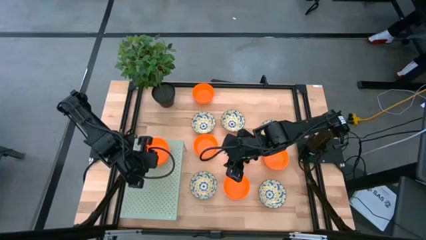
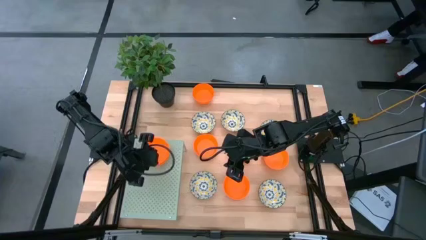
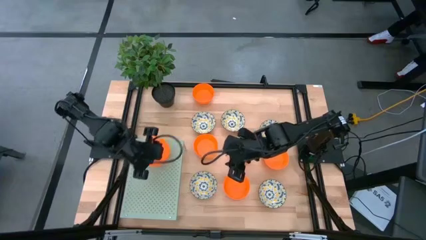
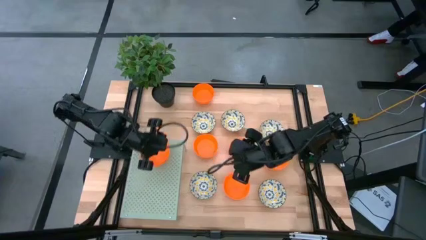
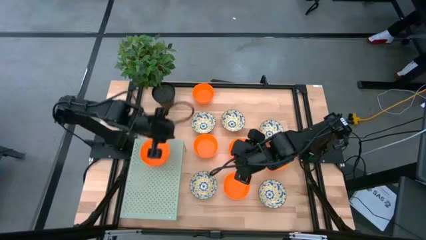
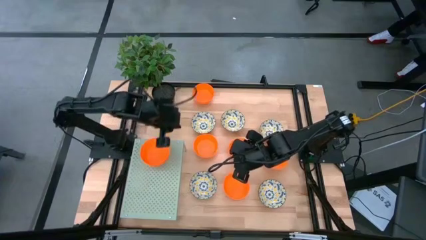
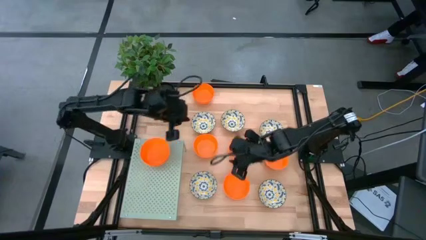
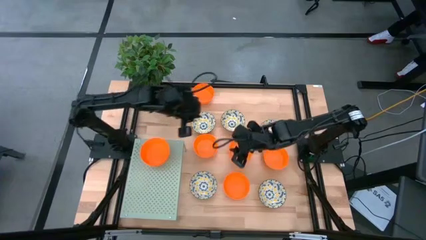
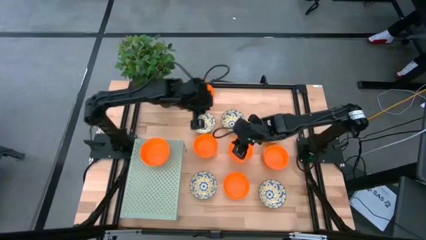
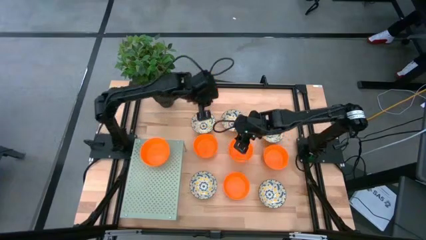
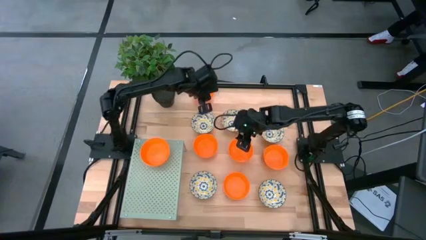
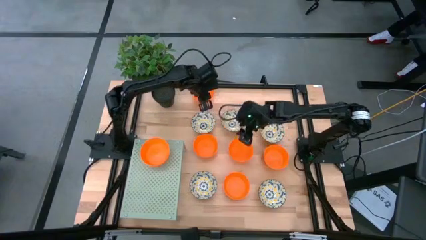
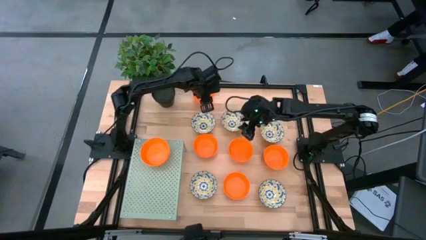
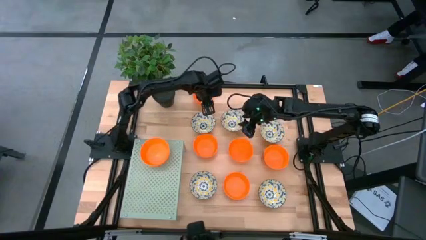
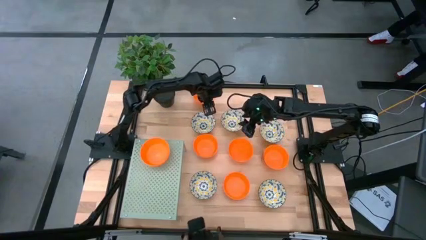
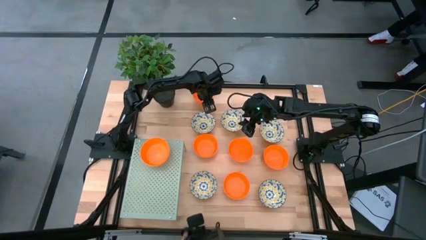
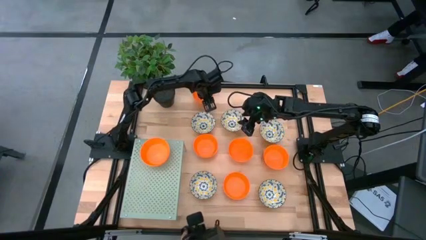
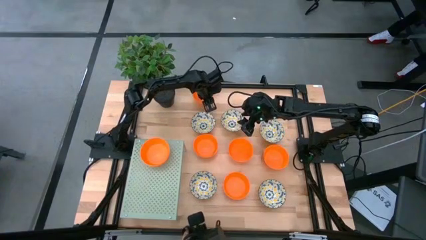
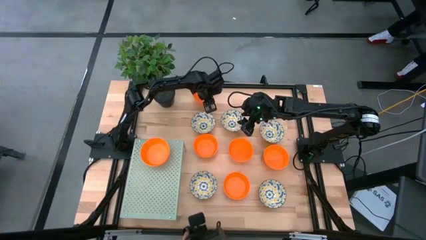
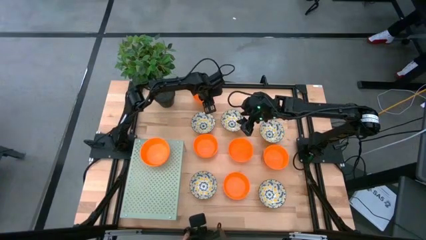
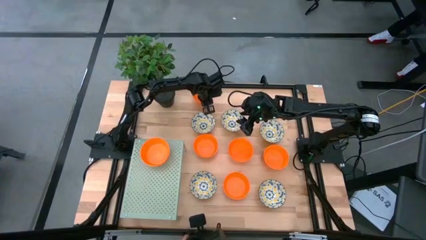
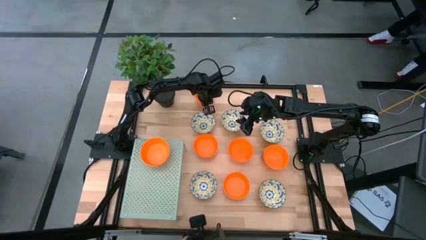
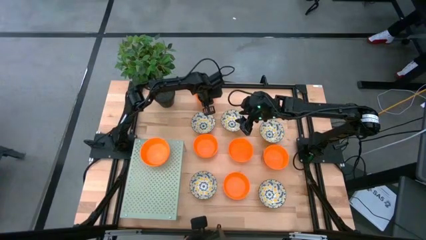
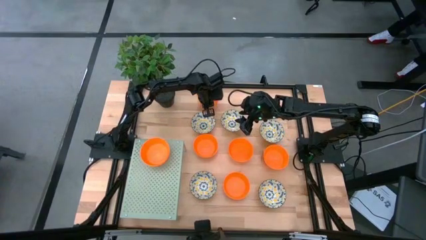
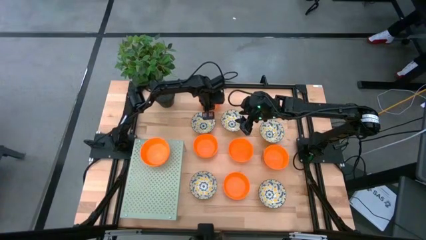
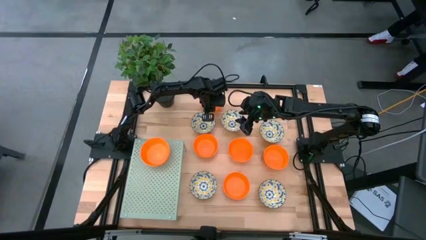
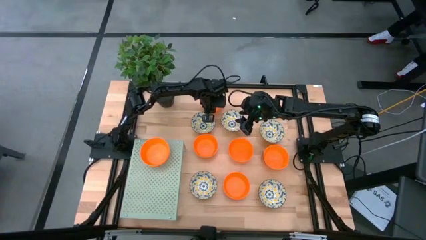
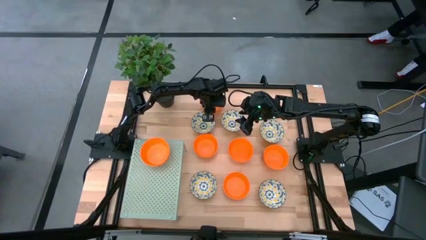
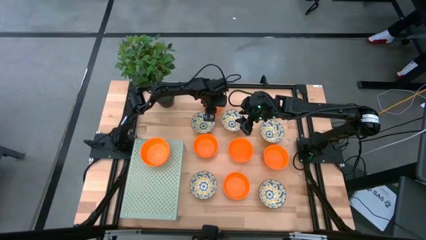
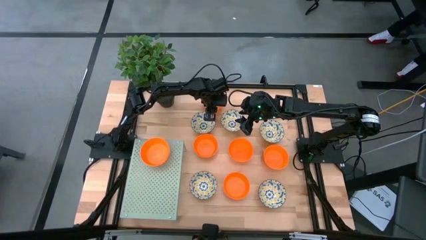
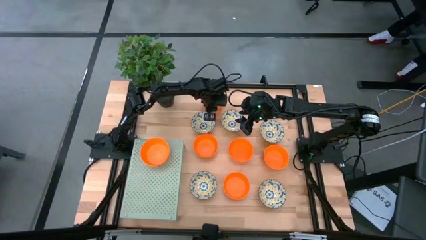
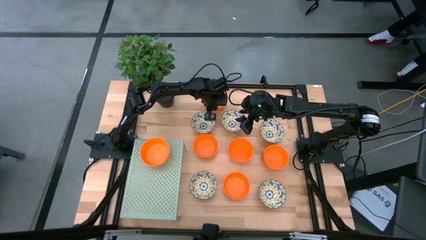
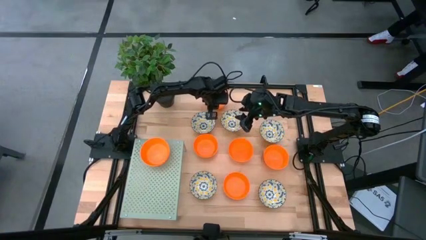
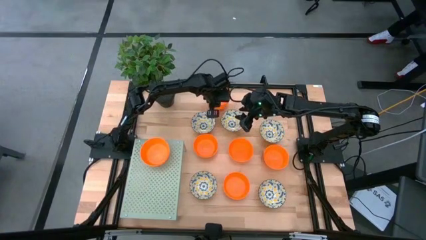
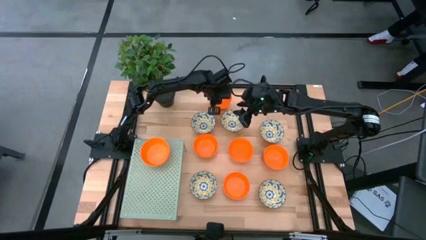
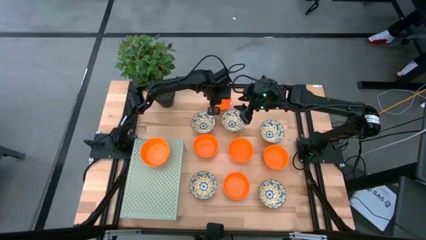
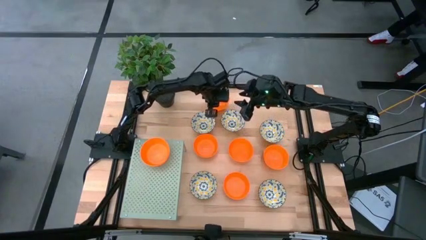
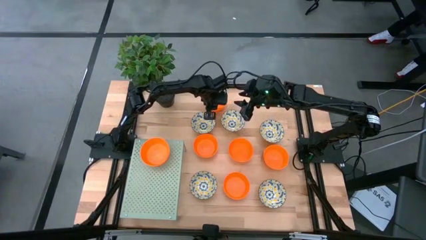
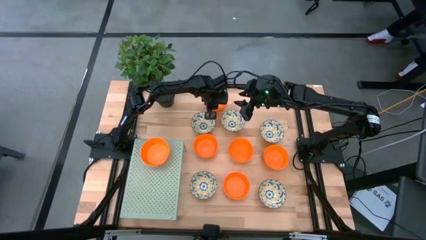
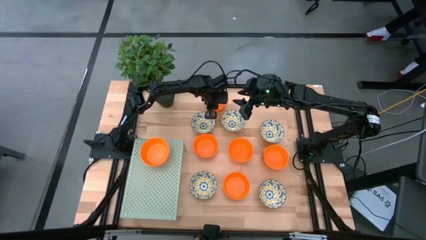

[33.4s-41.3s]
Task: Pick & Place Mini bowls
Stack the orange bowl on top of the orange bowl on the shelf

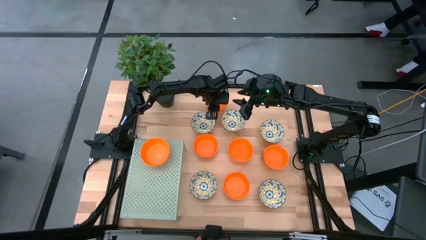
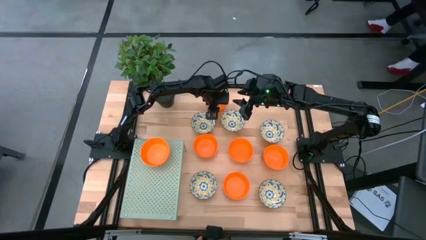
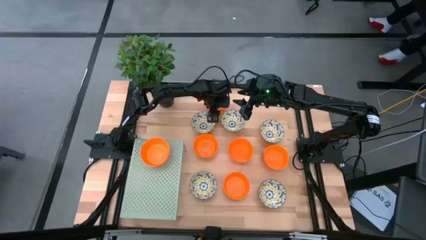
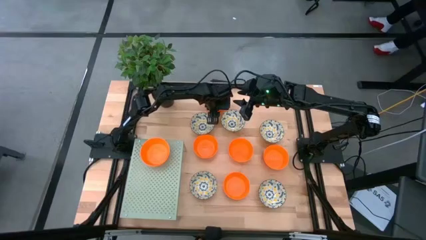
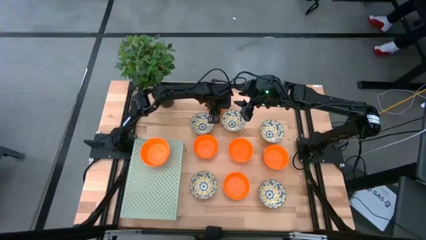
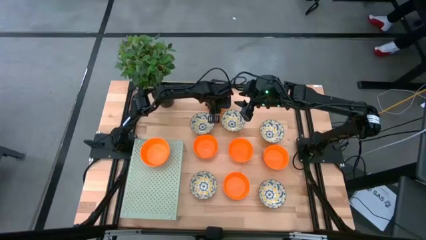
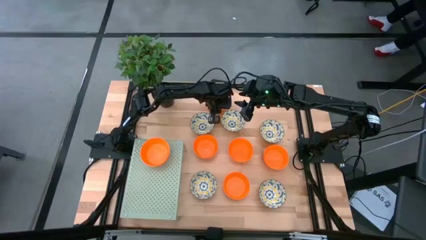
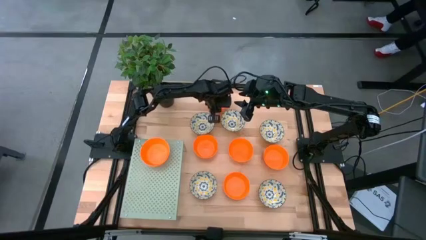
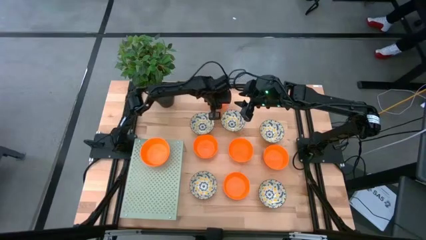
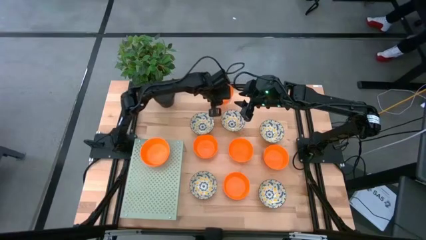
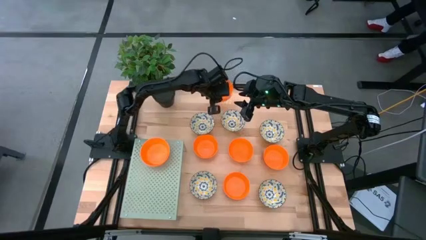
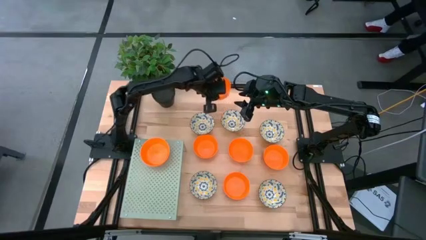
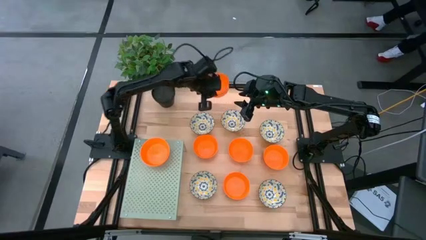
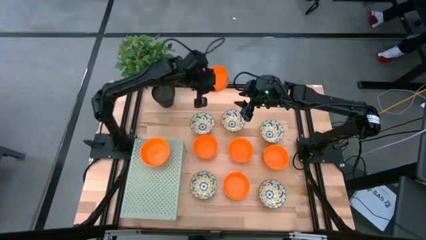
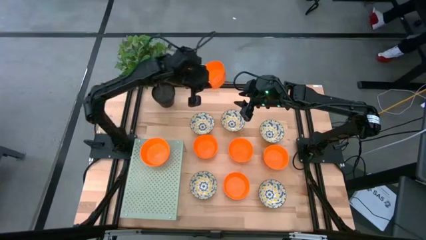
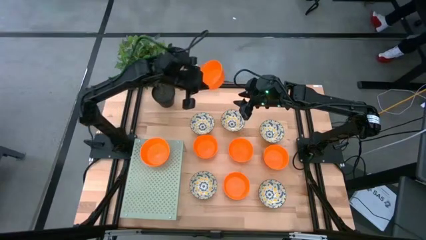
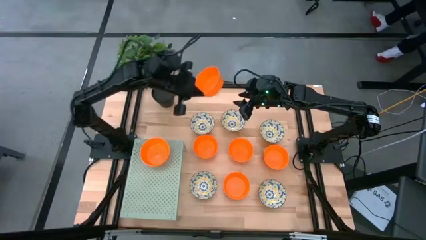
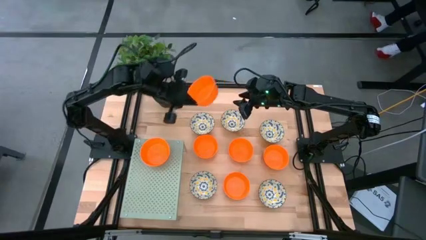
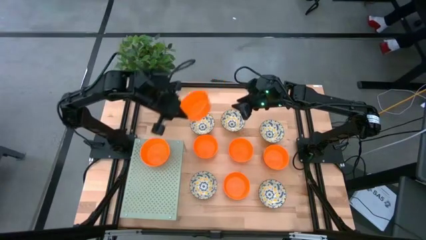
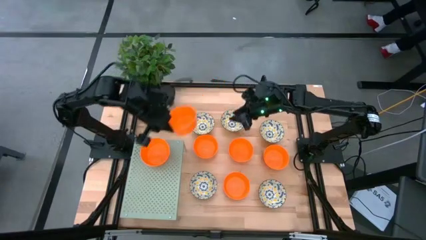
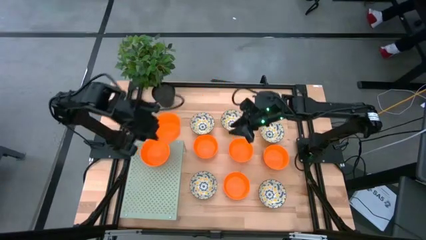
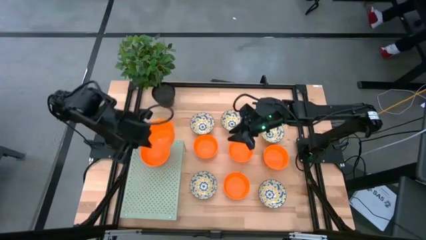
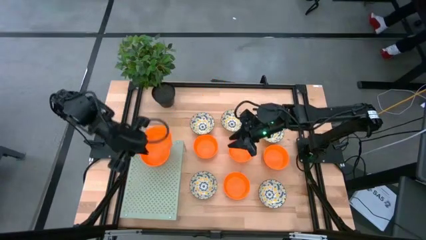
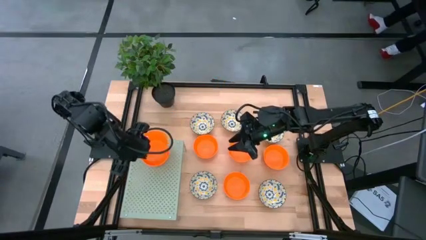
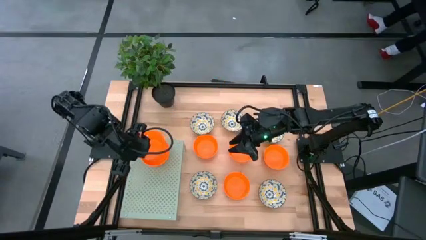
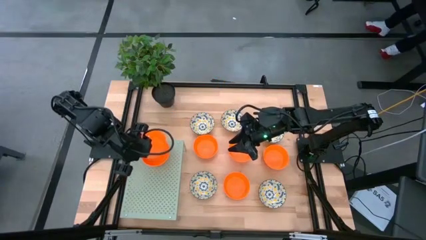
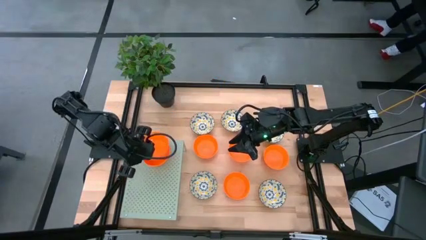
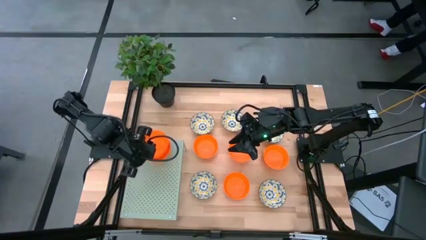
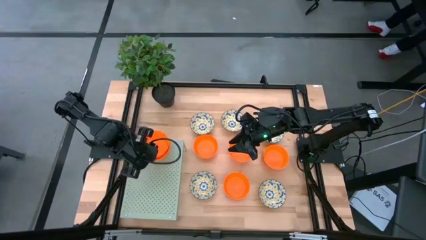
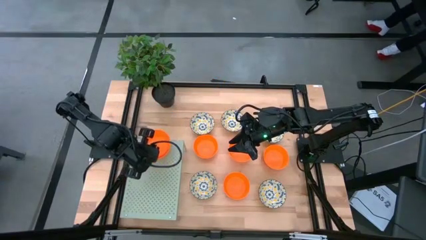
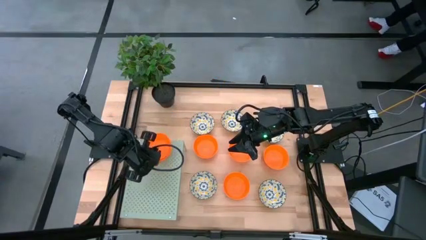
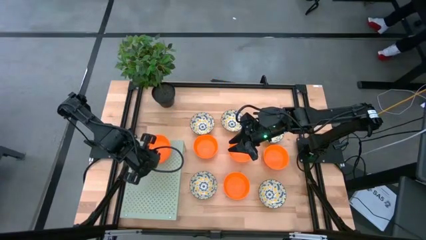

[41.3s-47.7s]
Stack the orange bowl on top of the orange bowl on the shelf

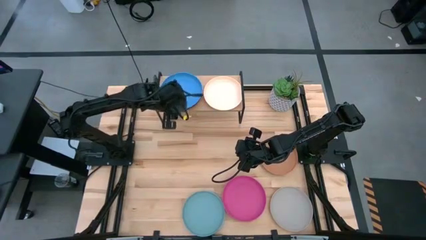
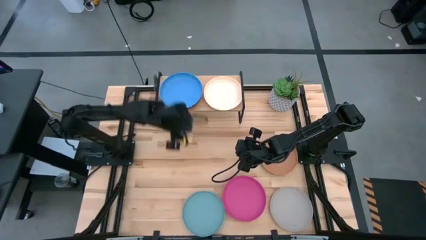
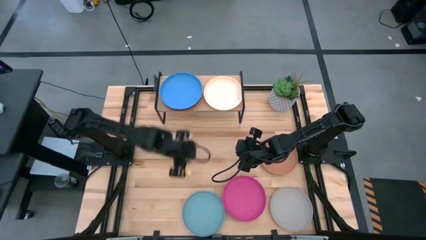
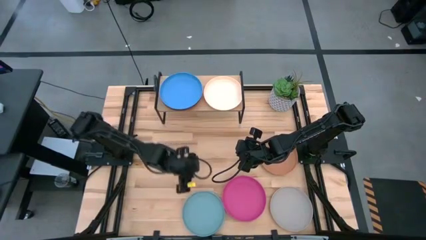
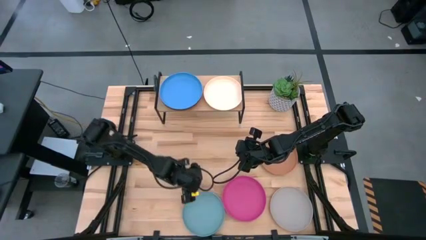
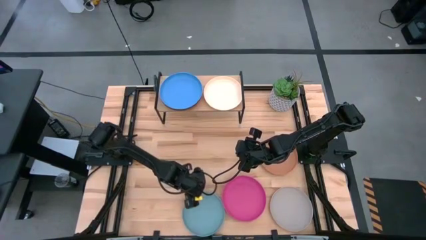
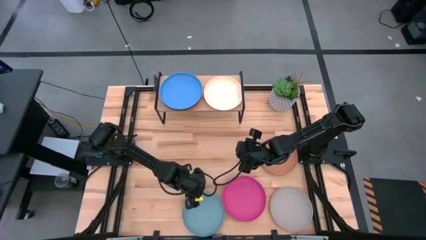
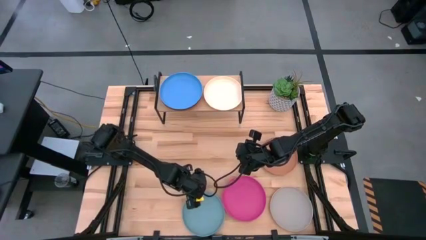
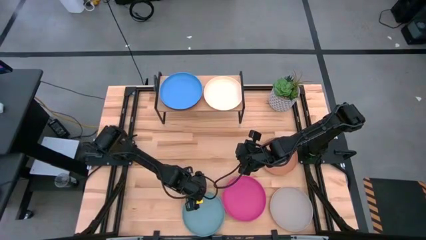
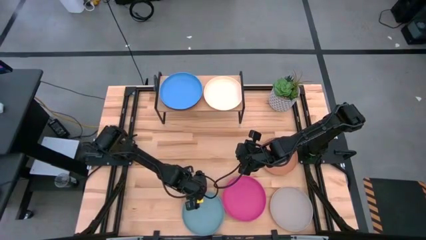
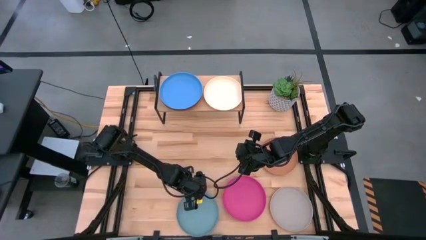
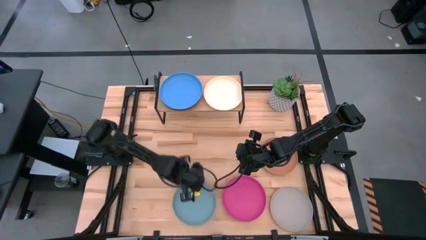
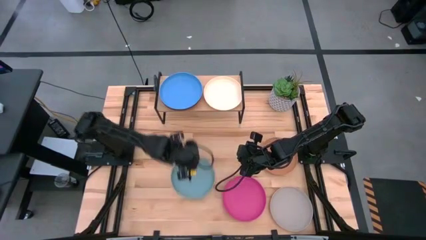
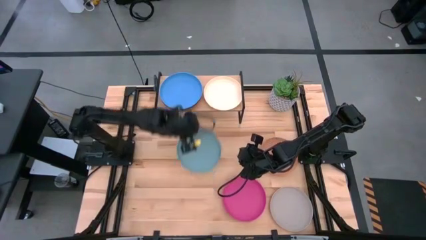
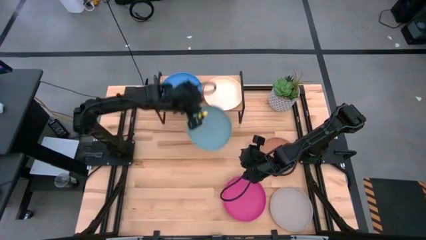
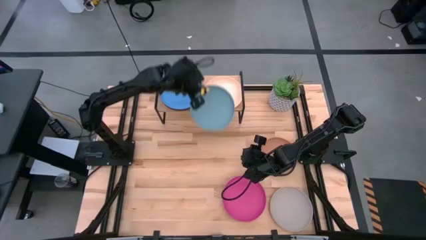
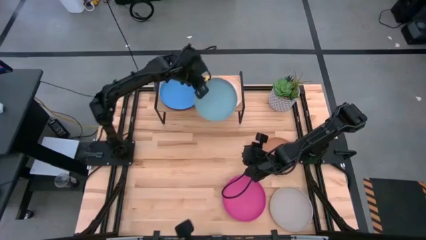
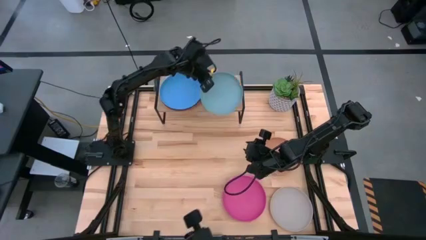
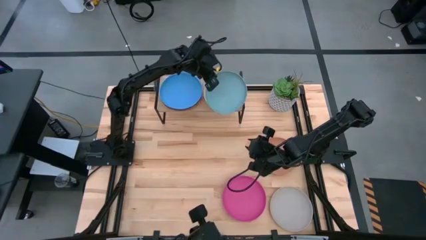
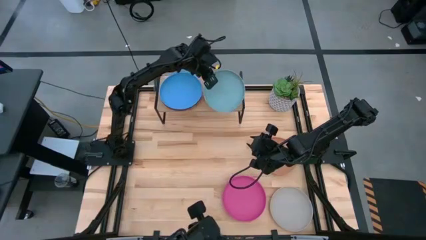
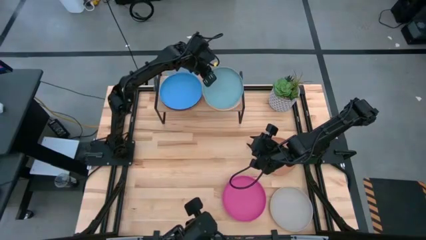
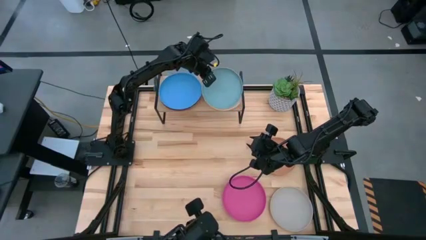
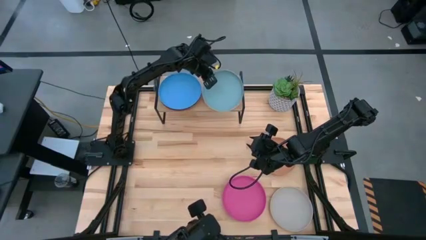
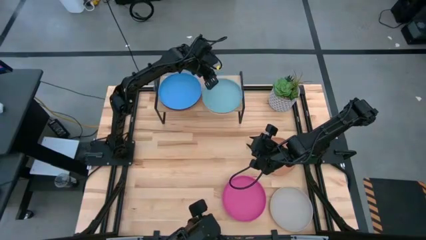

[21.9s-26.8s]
Task: Place and stack plates onto a shelf
Stack the light blue plate on top of the light brown plate on the shelf
